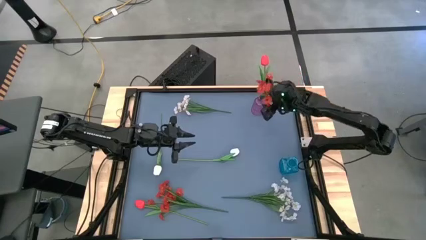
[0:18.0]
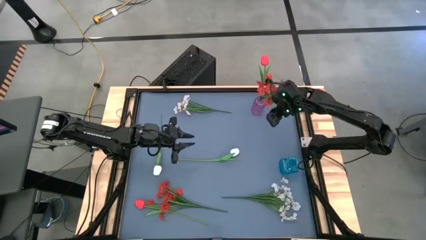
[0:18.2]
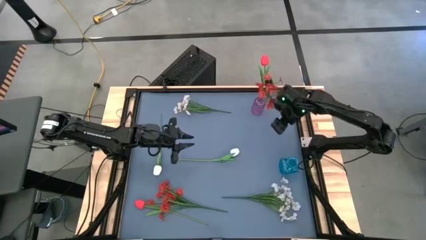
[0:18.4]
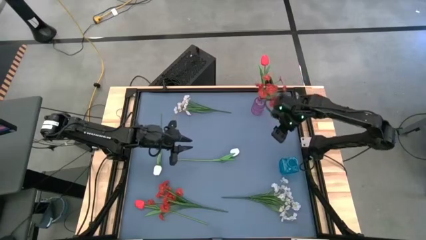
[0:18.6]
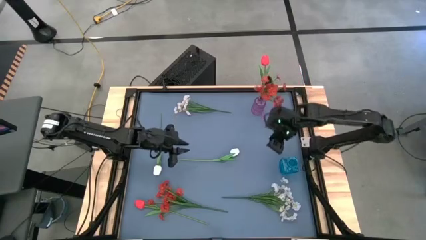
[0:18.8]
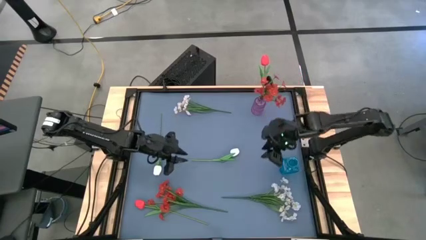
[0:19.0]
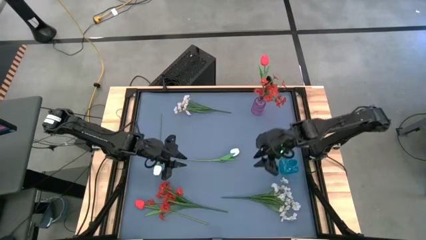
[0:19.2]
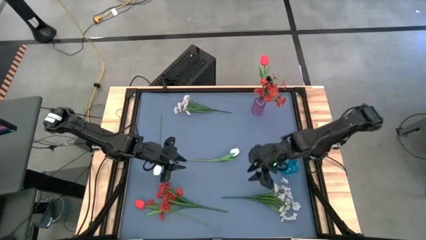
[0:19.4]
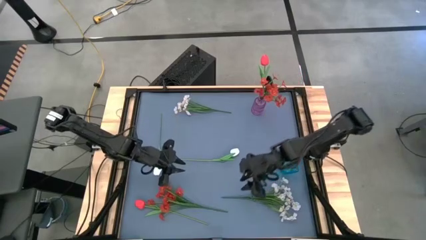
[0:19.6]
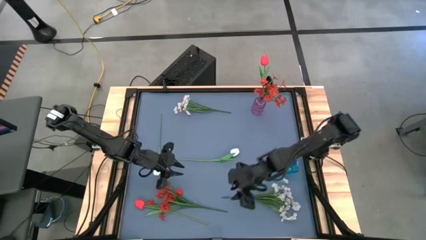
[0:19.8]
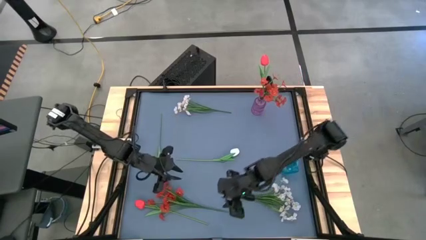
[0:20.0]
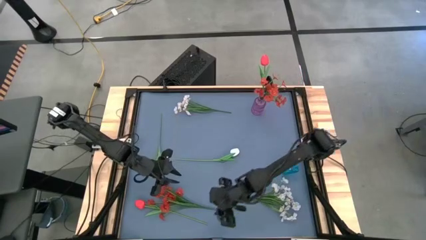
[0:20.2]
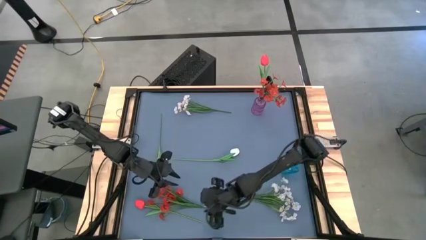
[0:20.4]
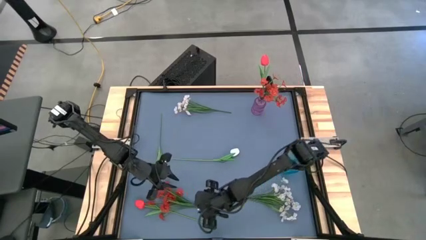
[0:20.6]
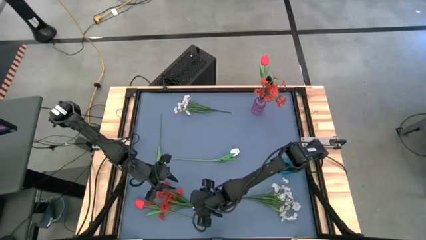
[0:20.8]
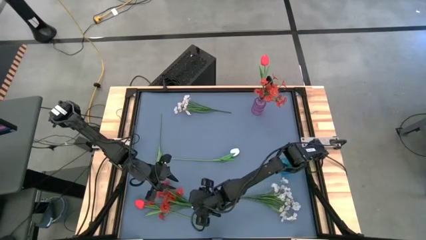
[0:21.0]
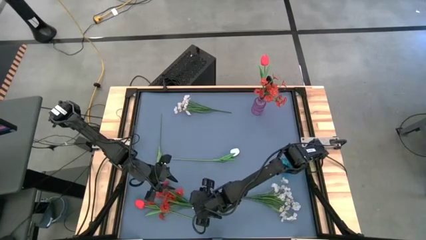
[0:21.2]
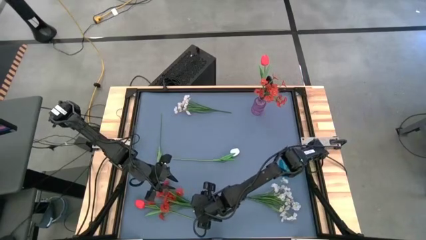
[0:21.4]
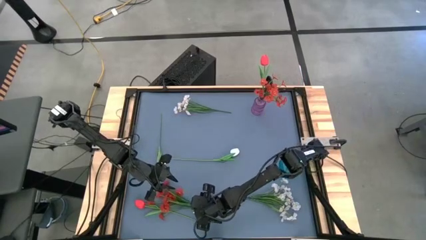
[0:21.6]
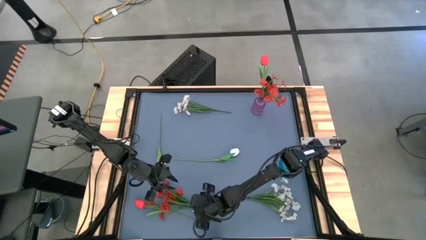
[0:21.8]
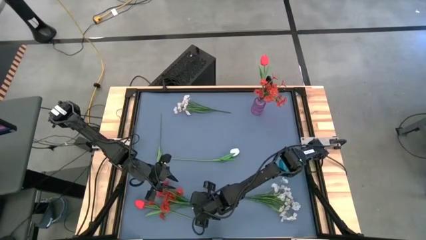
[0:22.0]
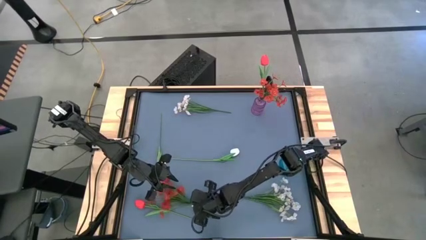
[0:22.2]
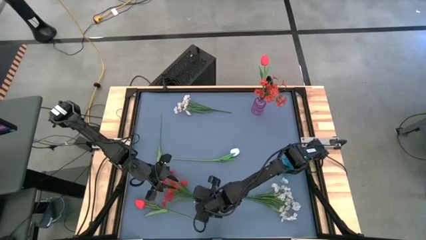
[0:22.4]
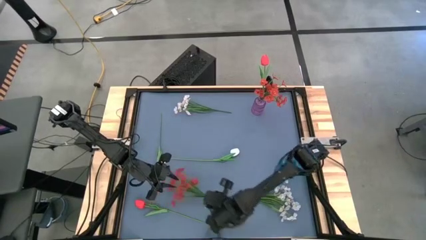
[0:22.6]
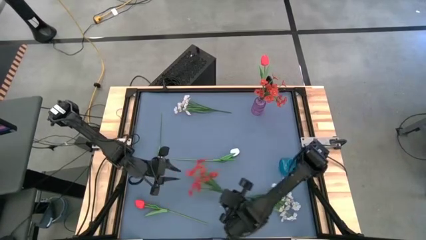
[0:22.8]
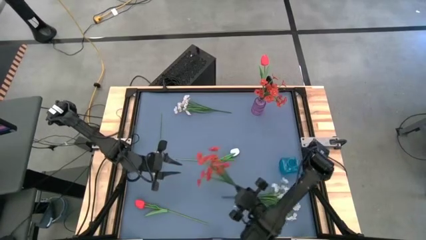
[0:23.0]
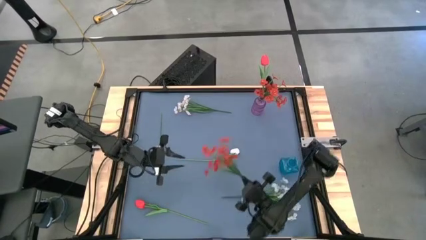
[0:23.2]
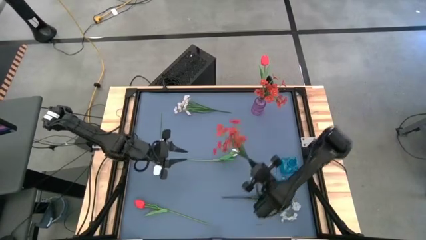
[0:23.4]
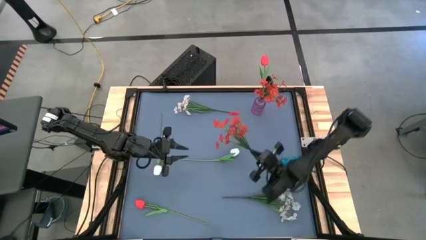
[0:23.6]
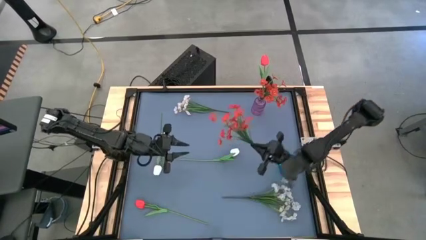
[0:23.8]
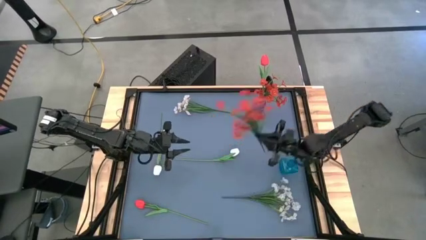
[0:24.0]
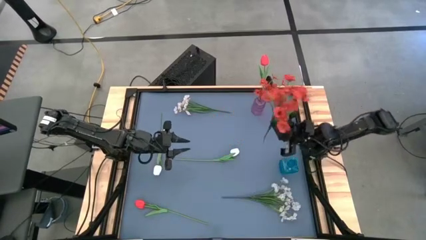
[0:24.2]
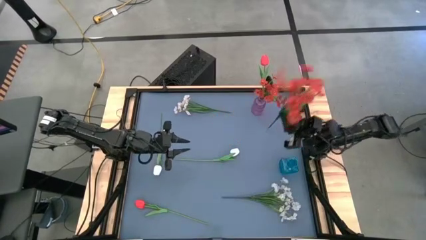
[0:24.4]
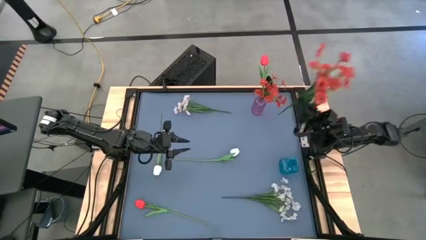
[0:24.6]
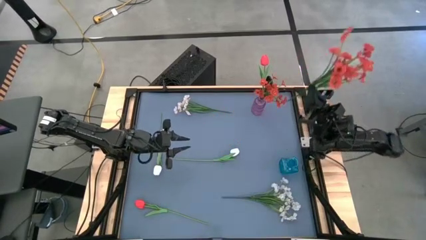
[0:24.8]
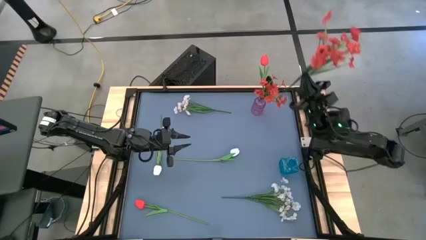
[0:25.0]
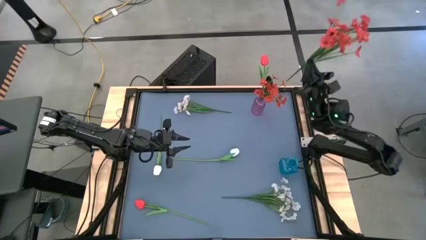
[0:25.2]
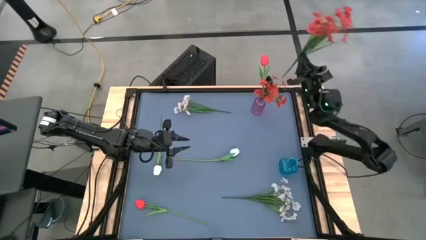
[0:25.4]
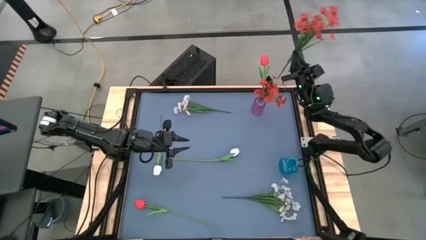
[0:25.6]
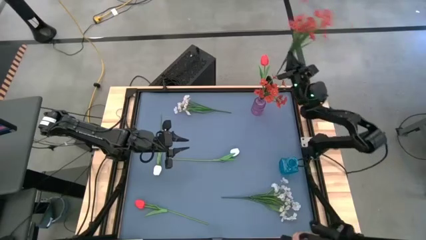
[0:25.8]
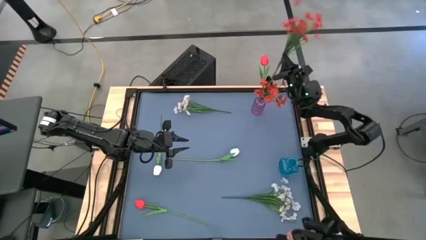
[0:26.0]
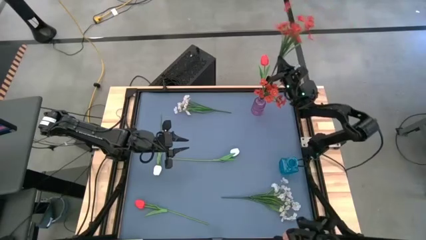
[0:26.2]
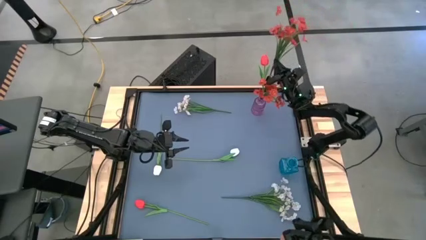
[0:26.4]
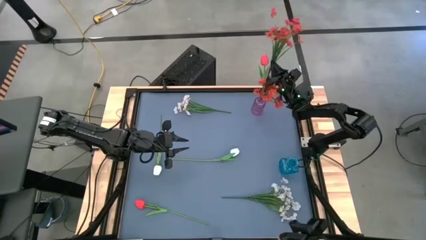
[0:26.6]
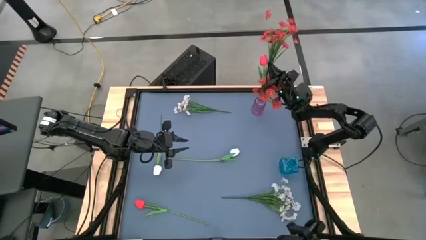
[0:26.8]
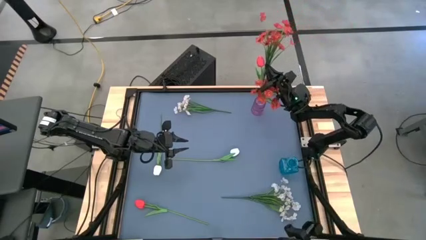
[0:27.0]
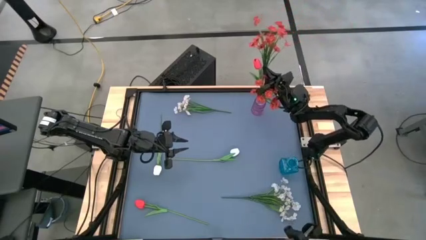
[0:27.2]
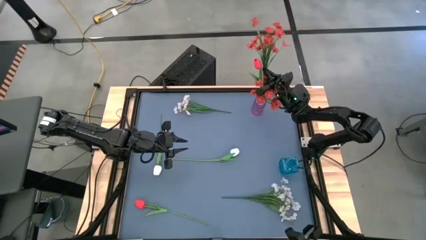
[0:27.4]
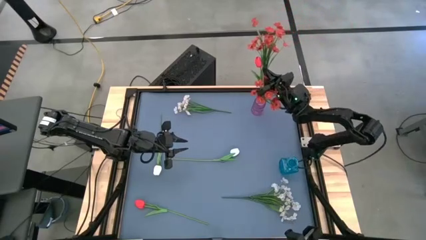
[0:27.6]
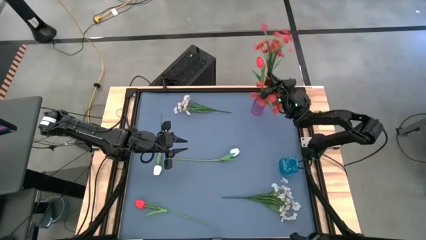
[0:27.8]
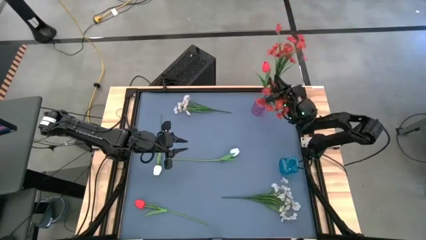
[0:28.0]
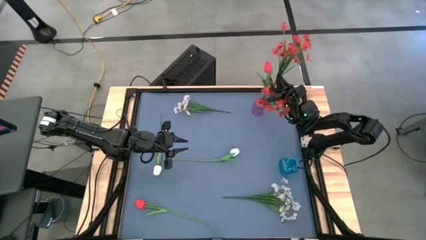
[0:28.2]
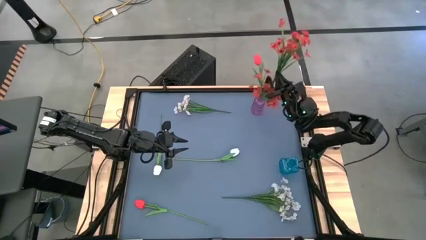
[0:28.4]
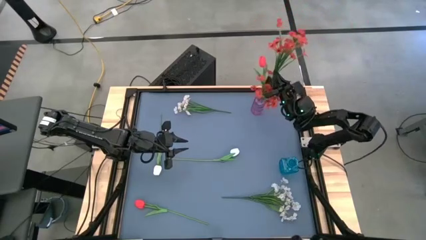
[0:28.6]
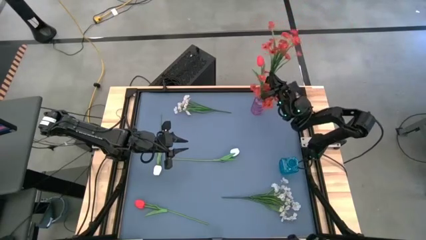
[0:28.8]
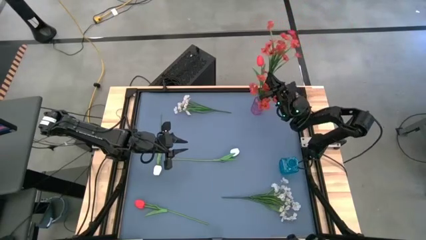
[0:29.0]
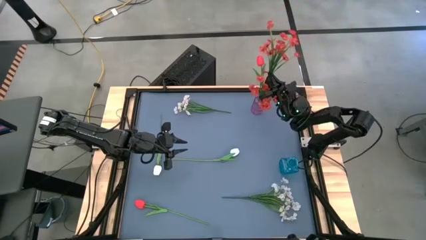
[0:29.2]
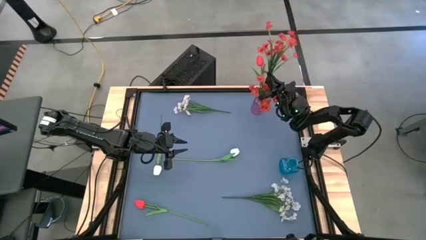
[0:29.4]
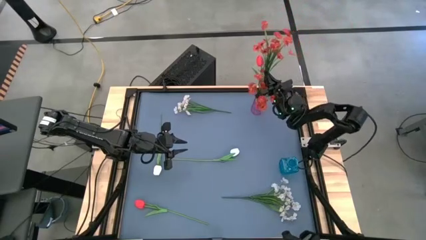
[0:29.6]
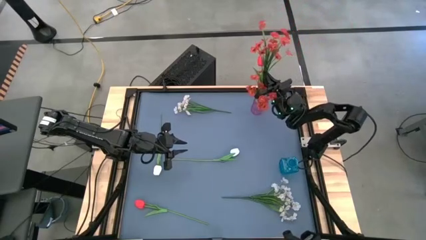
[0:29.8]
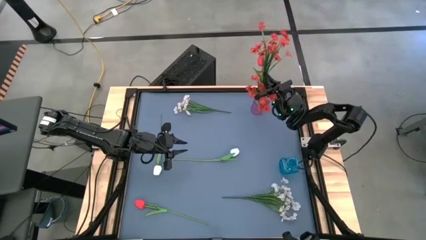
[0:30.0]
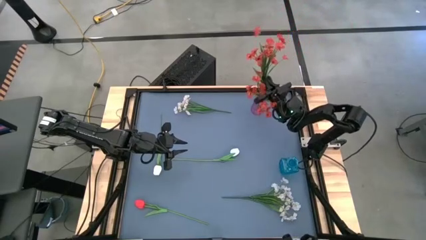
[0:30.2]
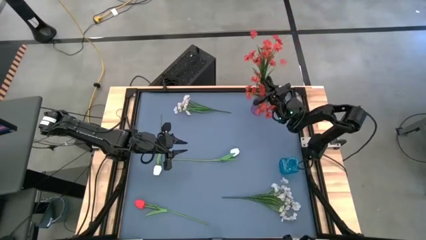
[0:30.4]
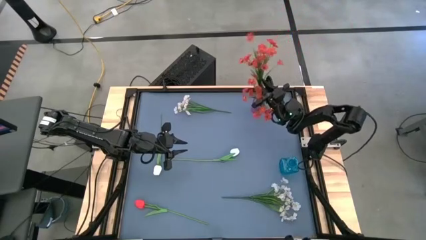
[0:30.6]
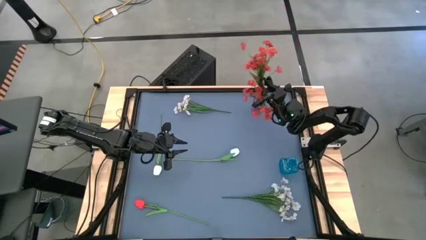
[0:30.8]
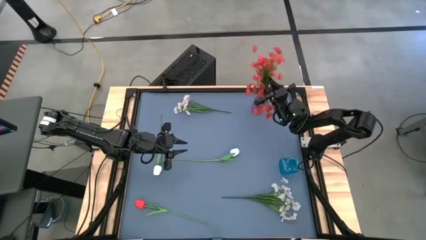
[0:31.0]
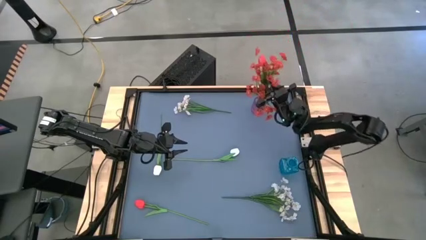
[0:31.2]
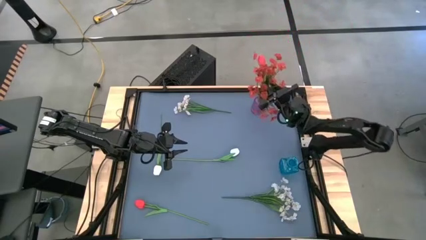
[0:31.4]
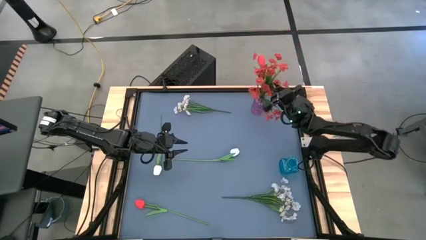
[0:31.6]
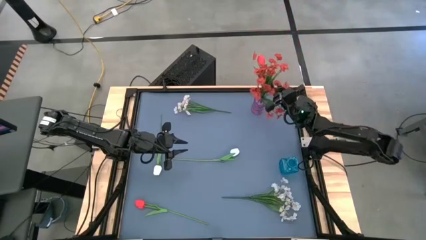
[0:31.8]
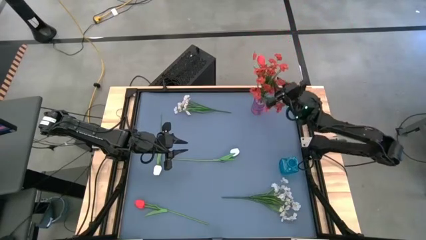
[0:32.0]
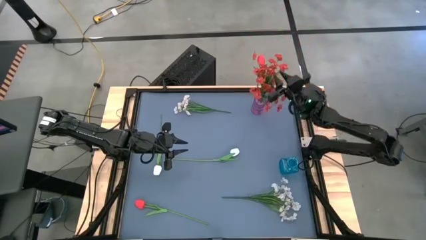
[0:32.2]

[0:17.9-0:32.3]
Task: Sort flowers into vase by color
Put the red flower into the purple vase
